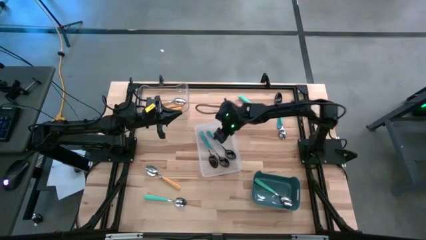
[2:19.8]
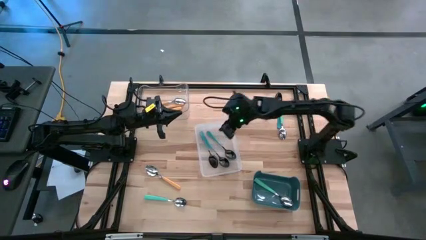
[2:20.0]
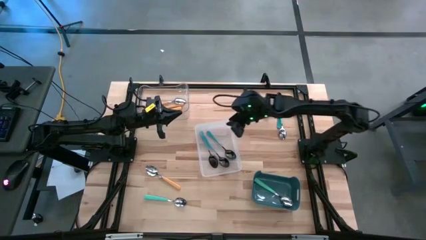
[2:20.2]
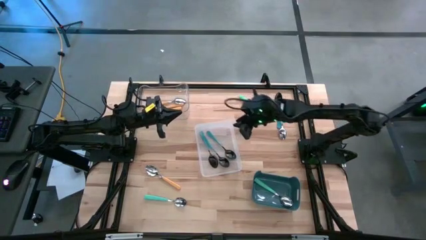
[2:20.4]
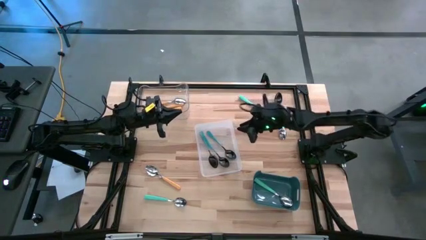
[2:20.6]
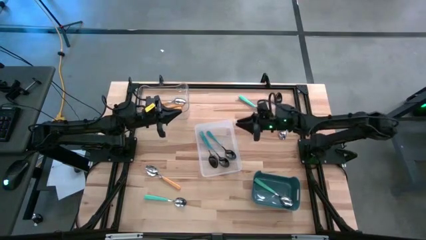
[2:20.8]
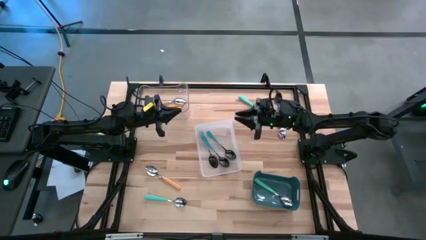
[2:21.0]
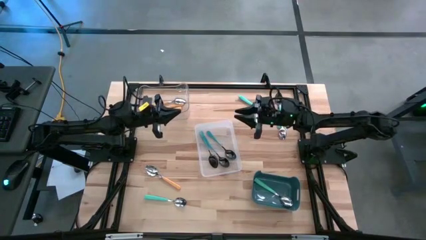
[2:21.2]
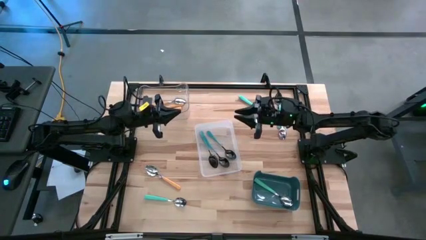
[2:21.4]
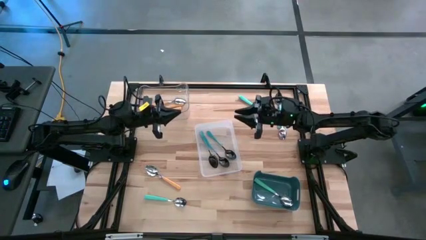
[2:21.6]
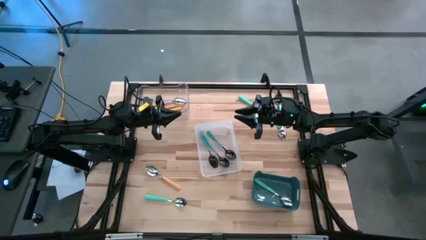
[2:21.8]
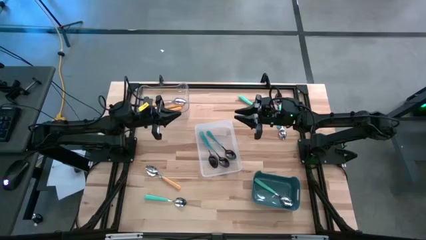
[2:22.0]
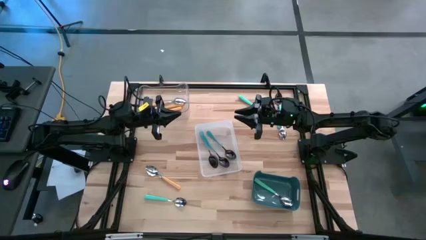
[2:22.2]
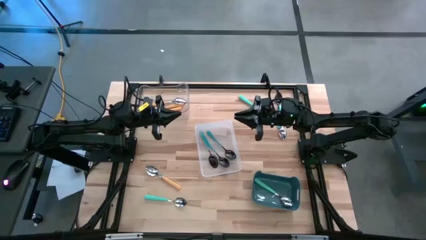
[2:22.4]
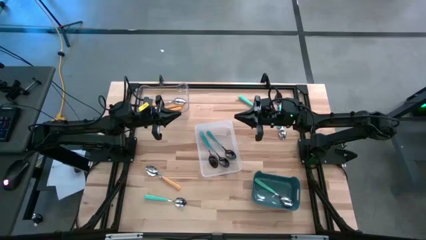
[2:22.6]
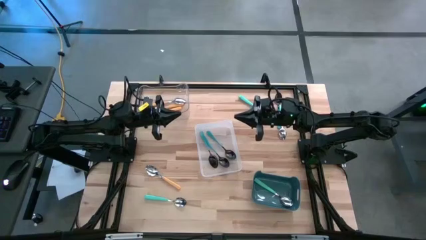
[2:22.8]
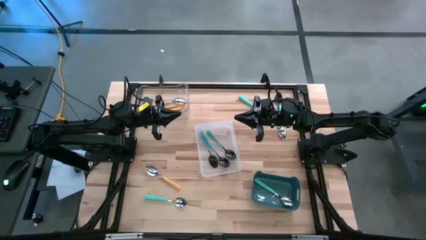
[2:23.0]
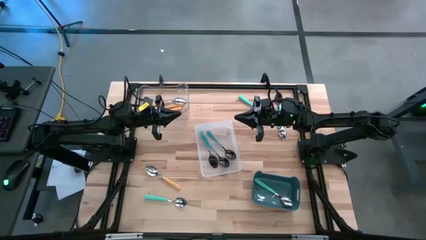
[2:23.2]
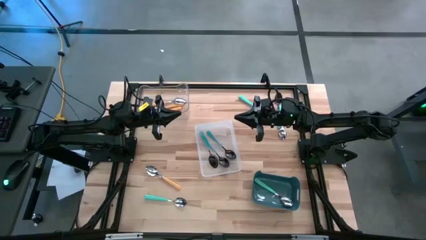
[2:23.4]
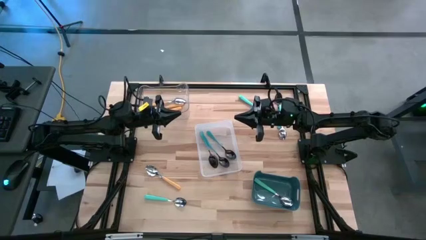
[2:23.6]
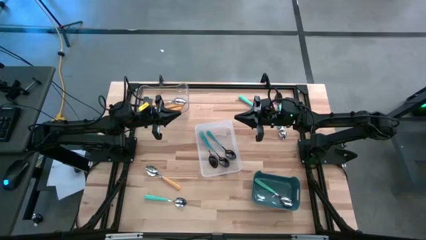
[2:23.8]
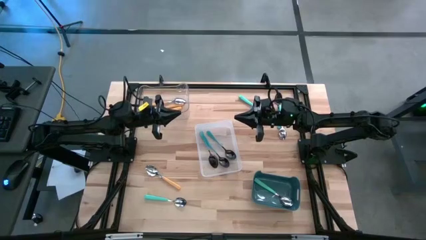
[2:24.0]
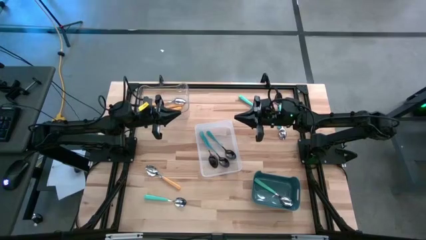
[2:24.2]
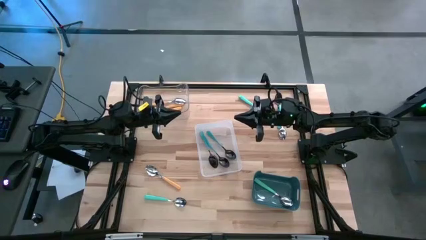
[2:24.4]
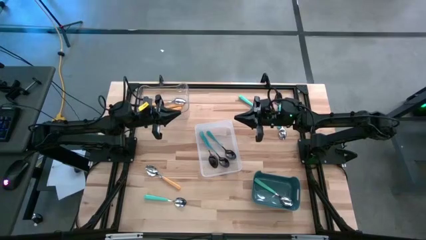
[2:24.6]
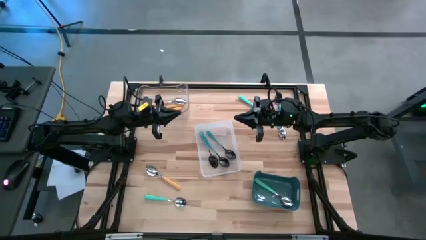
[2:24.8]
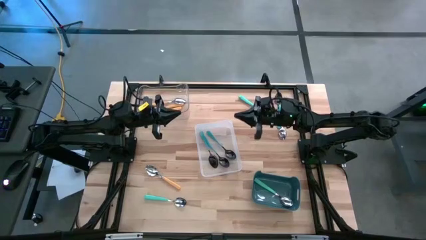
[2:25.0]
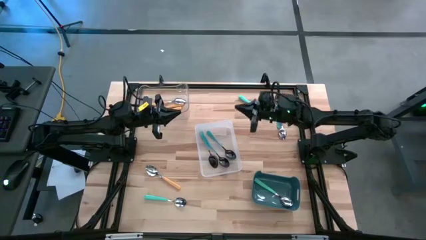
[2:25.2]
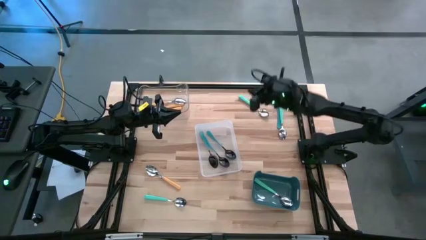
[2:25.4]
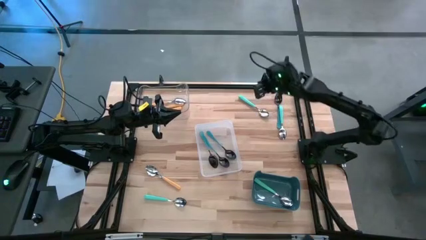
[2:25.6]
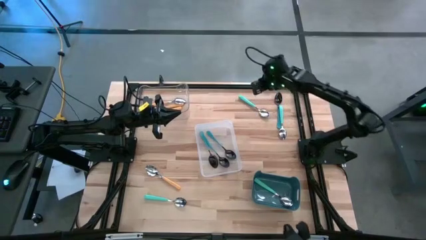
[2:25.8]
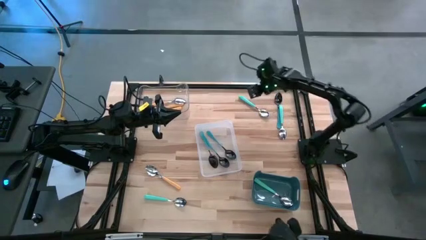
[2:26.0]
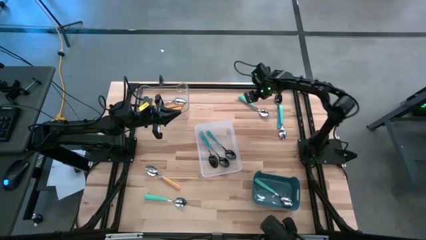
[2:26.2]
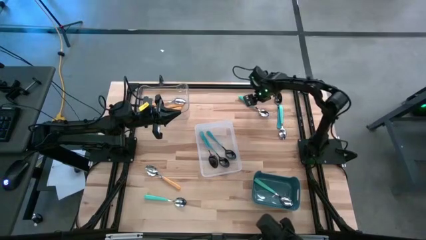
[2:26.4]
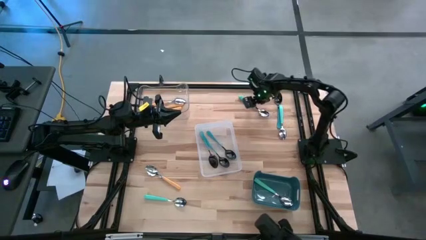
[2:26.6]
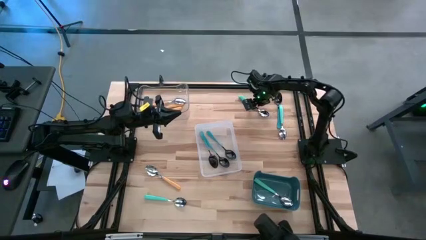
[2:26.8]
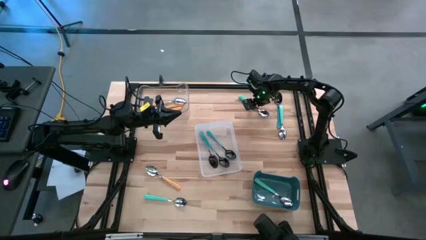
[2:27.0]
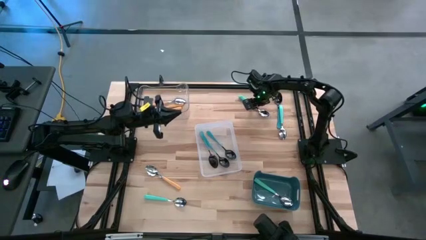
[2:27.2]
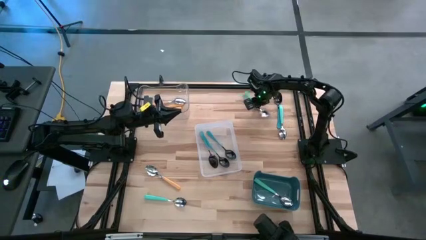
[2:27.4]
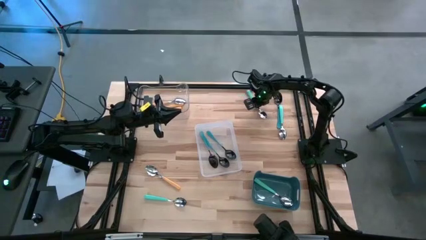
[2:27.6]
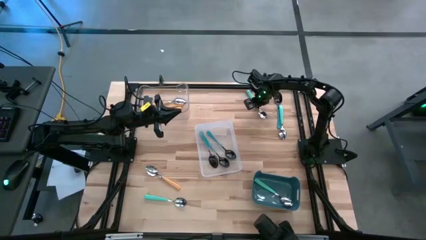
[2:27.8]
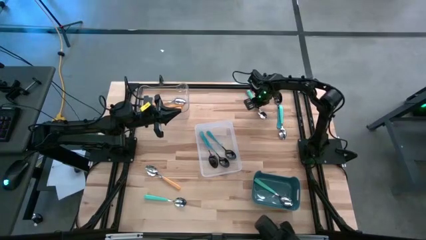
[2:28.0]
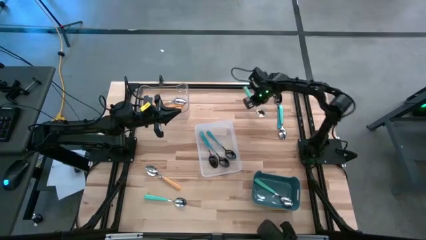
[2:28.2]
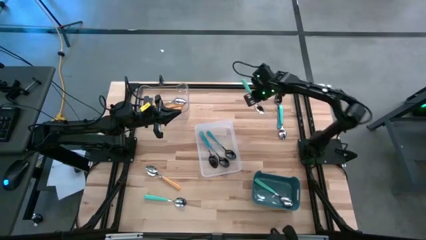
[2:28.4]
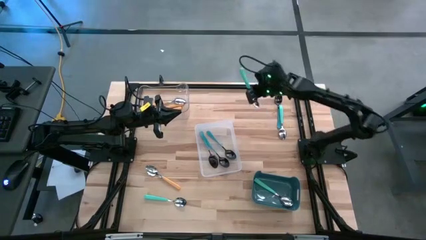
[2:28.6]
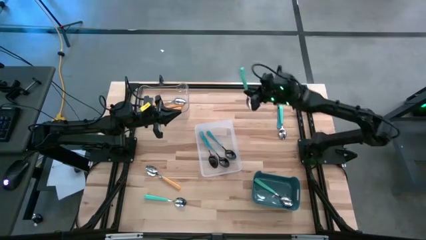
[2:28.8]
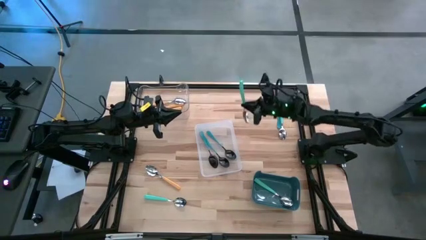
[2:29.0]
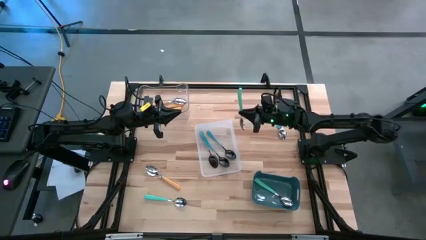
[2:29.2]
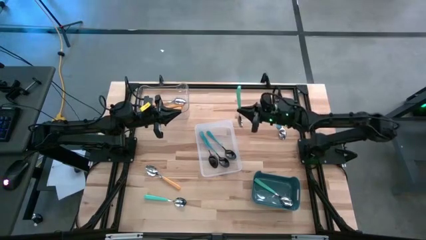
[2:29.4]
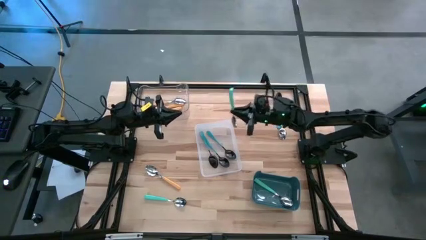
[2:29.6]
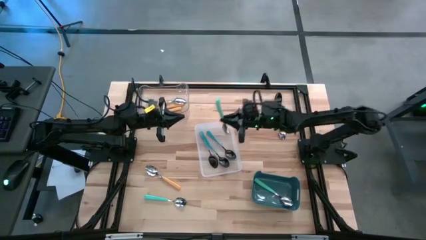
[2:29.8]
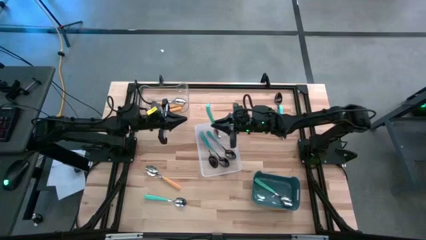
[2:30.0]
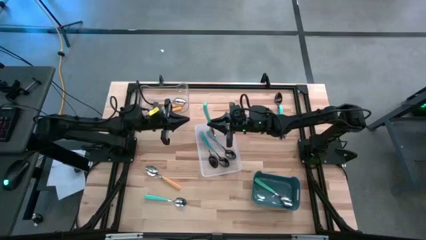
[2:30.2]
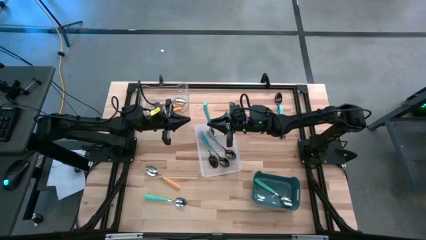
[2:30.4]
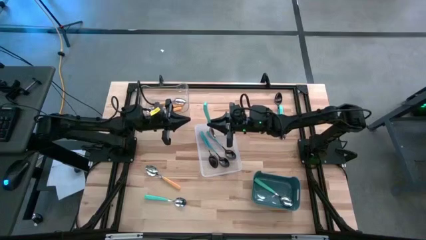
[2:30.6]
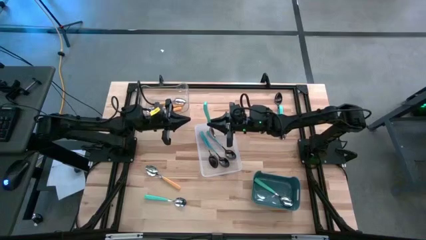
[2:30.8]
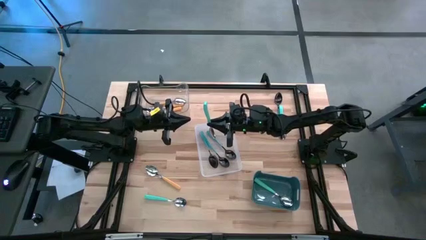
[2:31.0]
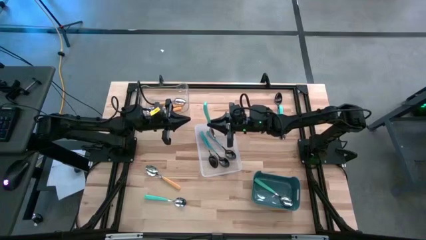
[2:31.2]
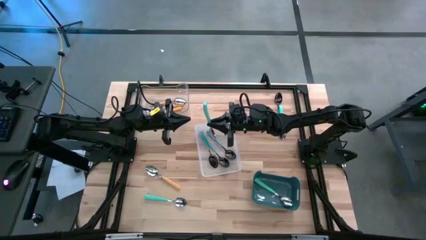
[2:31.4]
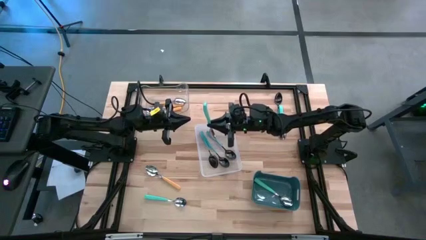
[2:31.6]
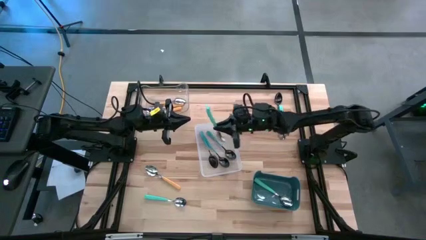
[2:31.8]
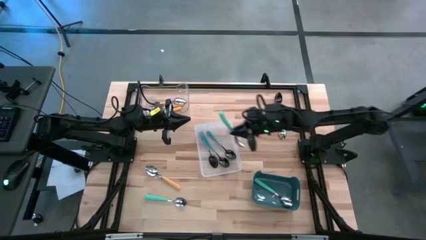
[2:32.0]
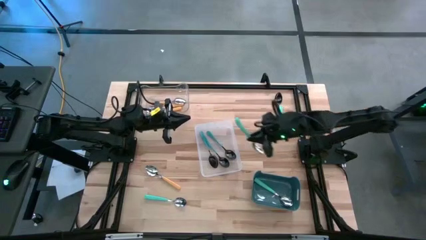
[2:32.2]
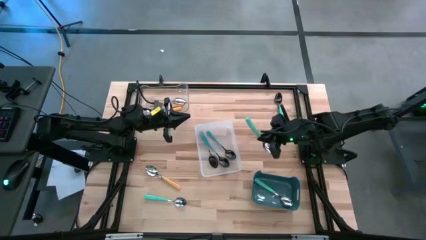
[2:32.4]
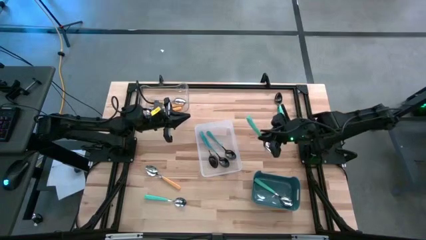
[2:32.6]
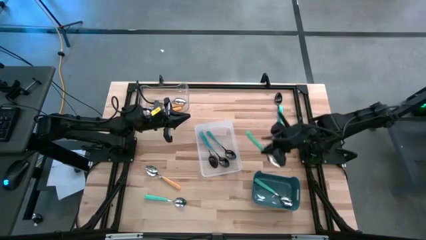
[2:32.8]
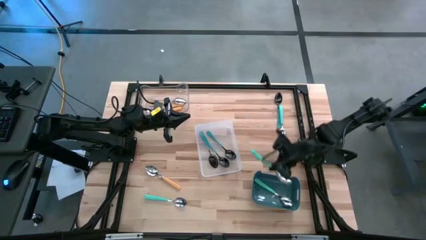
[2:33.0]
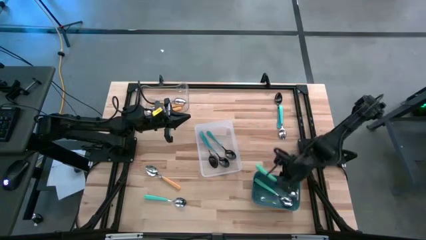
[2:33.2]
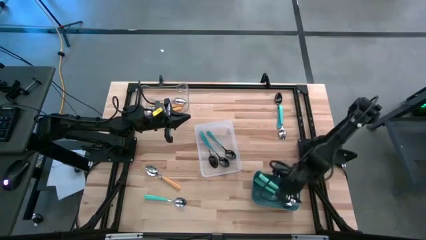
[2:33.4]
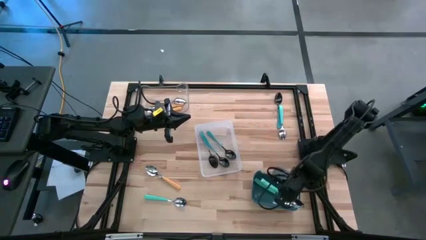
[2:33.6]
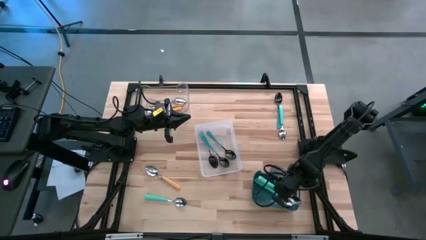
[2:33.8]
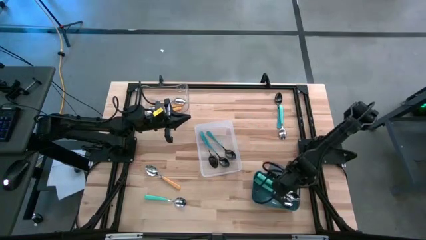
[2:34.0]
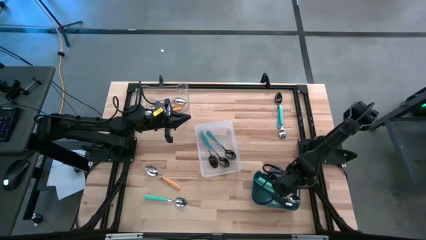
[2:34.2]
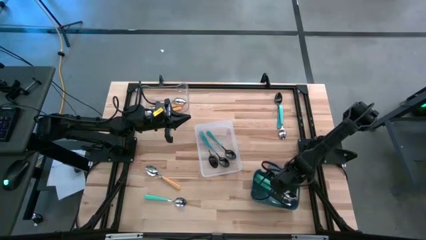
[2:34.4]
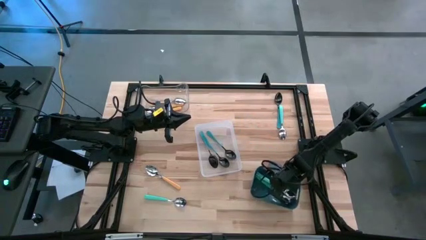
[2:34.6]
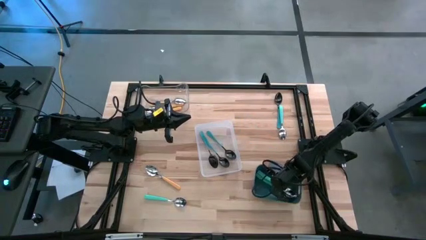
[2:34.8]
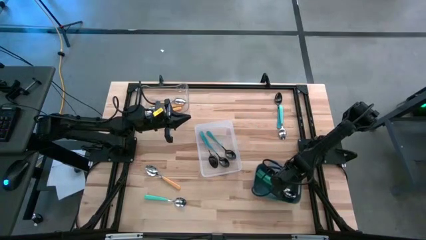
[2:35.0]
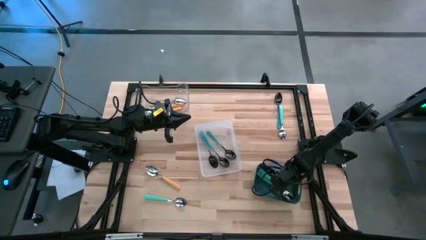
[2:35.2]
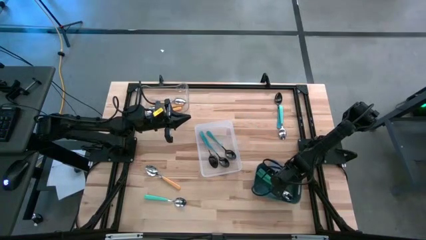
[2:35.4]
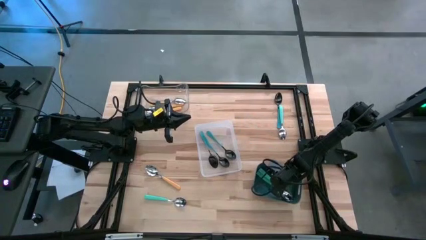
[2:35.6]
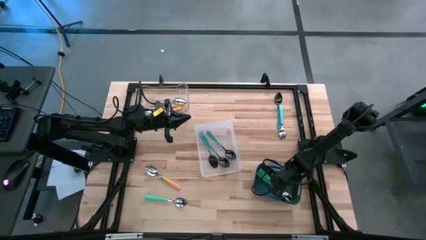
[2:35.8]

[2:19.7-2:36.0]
Task: Sort silverware by color (type)
Put the light blue spoon into the blue bin
